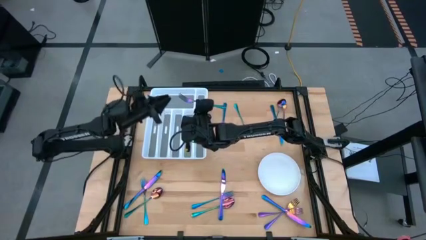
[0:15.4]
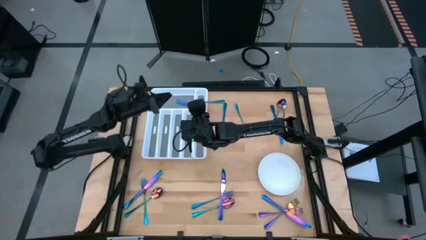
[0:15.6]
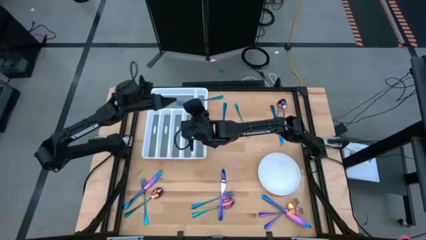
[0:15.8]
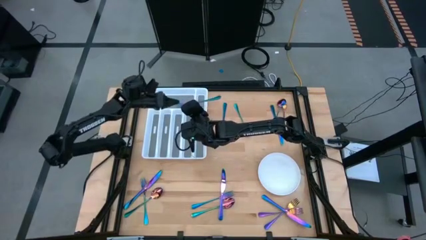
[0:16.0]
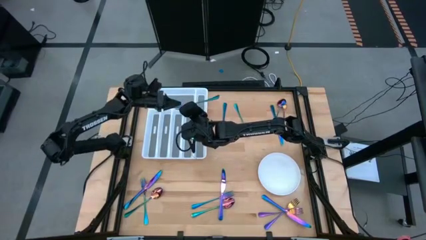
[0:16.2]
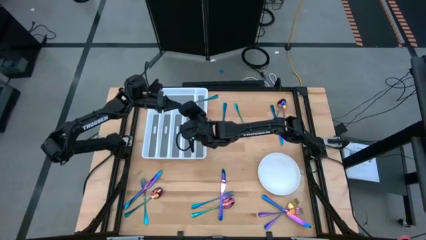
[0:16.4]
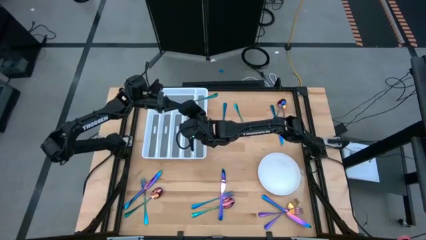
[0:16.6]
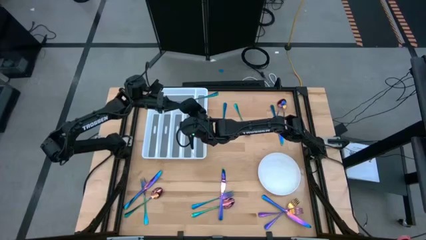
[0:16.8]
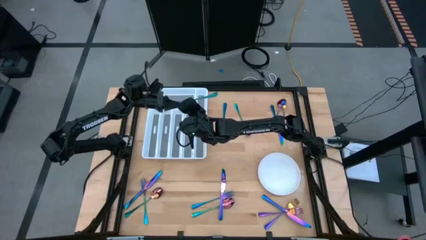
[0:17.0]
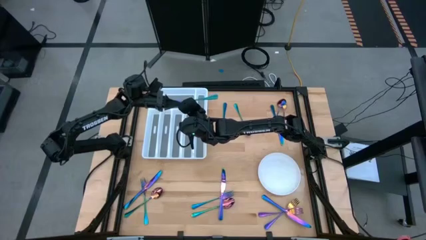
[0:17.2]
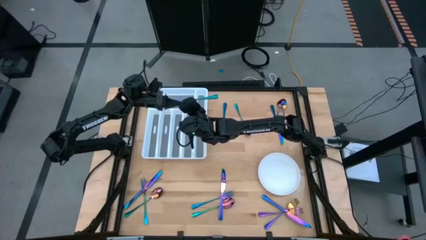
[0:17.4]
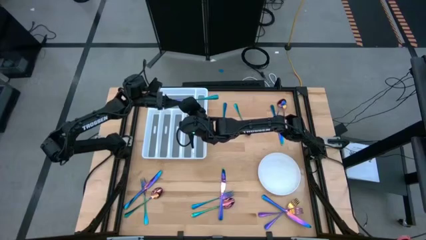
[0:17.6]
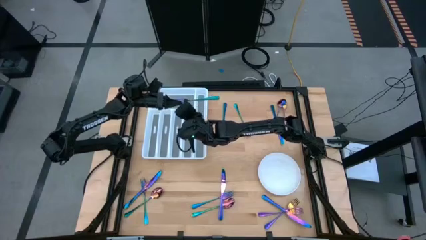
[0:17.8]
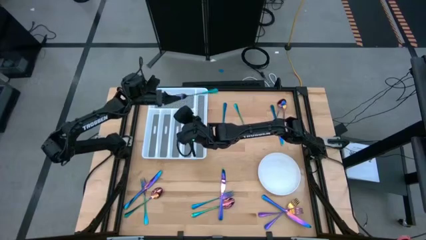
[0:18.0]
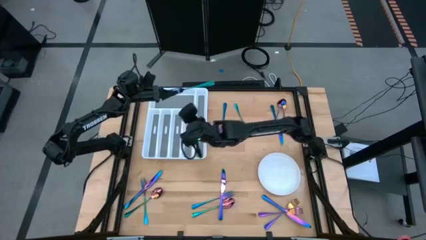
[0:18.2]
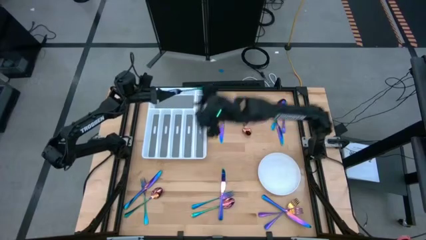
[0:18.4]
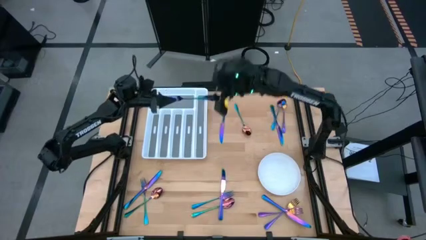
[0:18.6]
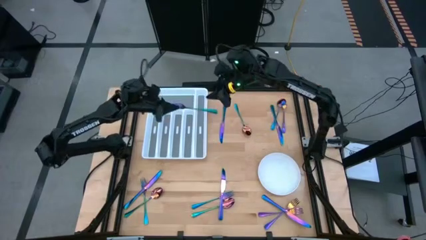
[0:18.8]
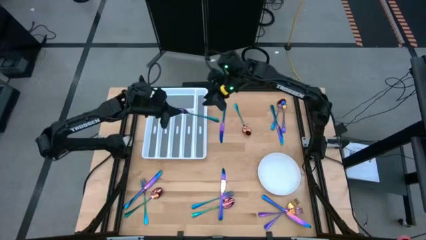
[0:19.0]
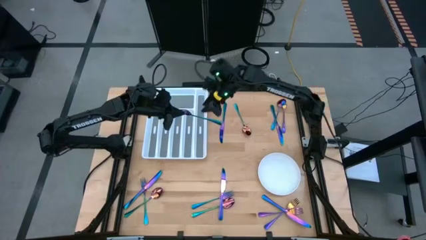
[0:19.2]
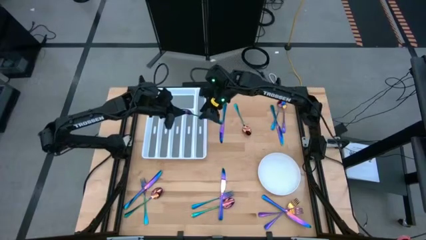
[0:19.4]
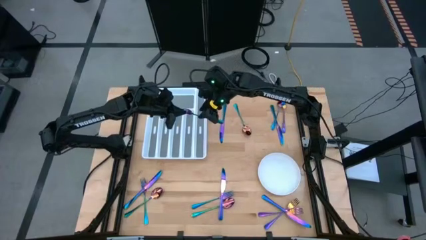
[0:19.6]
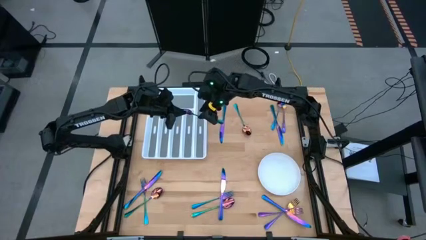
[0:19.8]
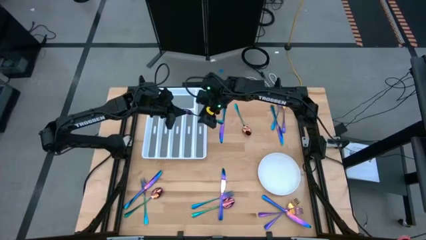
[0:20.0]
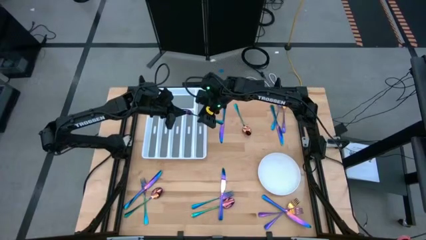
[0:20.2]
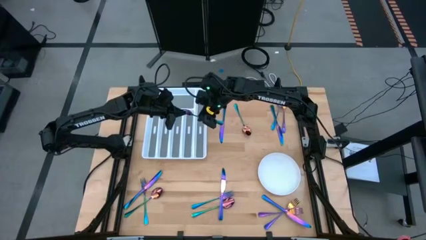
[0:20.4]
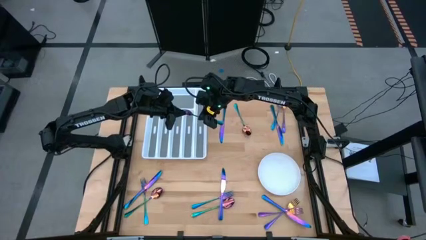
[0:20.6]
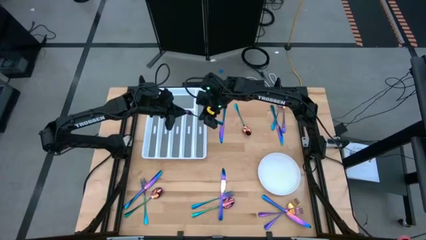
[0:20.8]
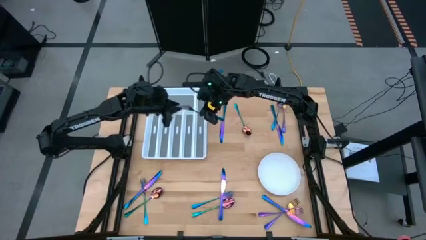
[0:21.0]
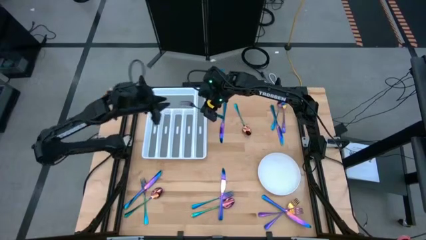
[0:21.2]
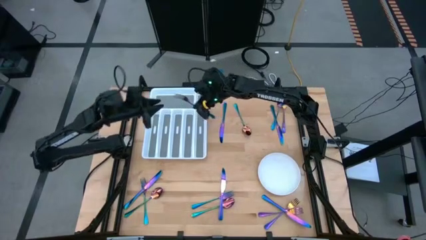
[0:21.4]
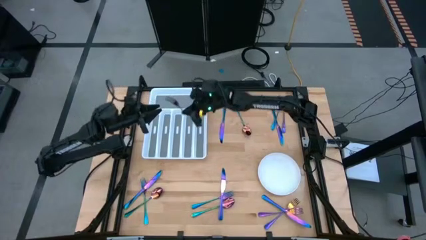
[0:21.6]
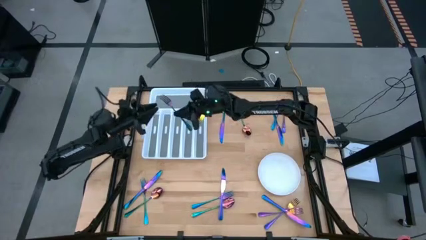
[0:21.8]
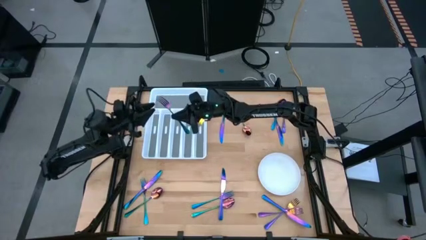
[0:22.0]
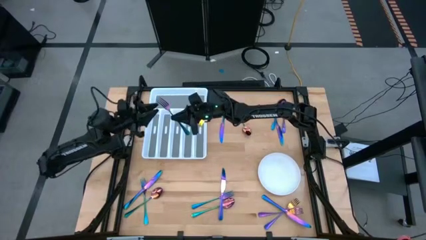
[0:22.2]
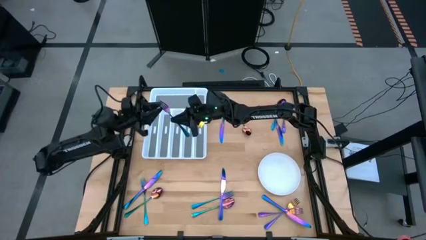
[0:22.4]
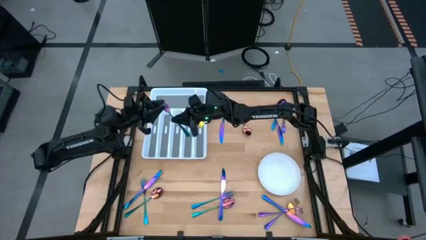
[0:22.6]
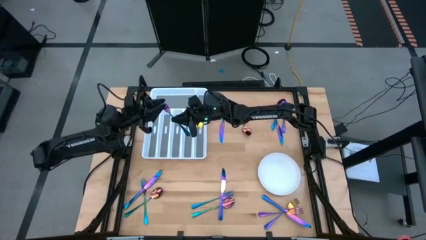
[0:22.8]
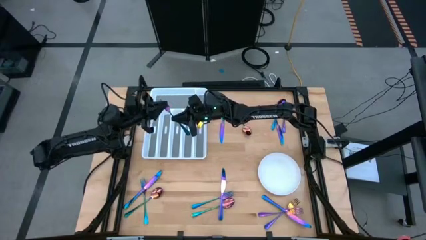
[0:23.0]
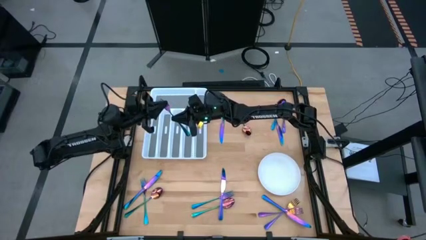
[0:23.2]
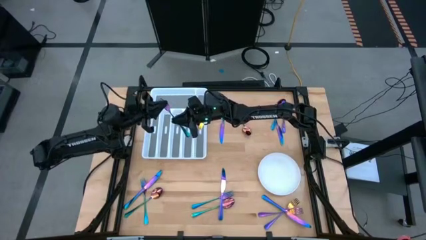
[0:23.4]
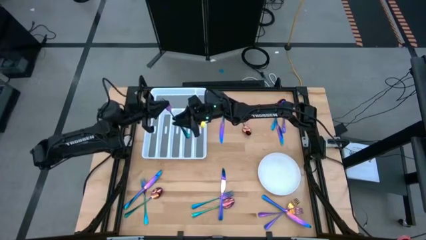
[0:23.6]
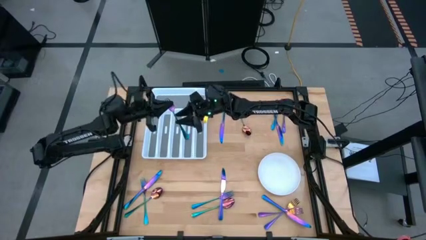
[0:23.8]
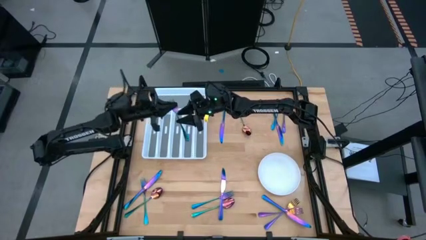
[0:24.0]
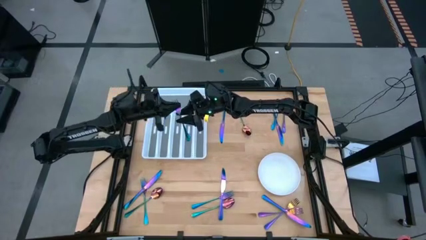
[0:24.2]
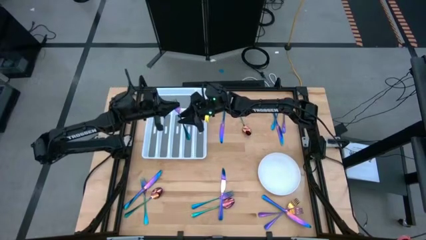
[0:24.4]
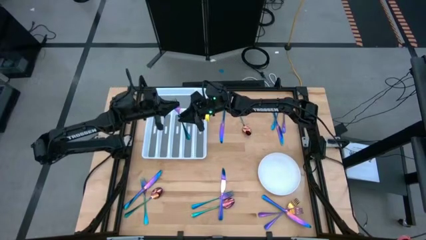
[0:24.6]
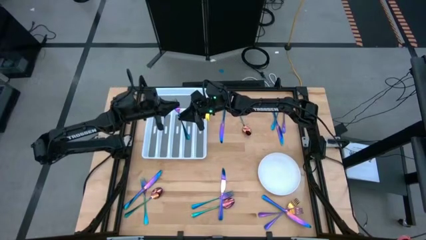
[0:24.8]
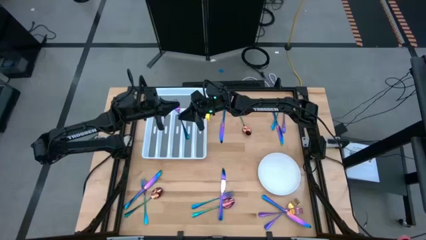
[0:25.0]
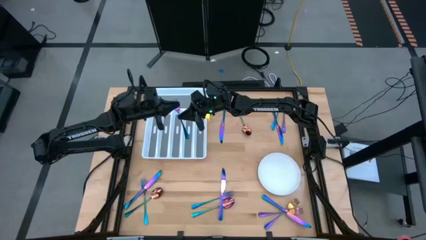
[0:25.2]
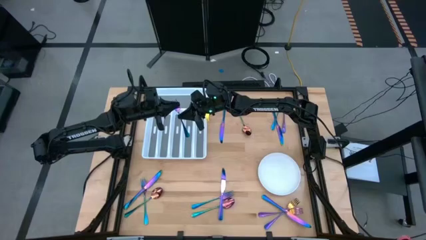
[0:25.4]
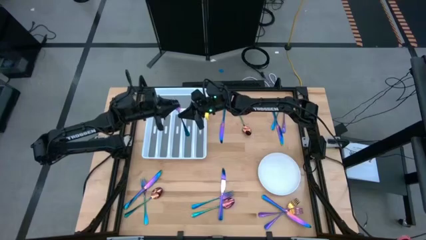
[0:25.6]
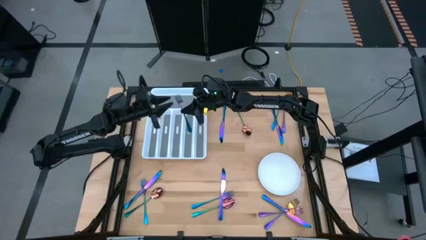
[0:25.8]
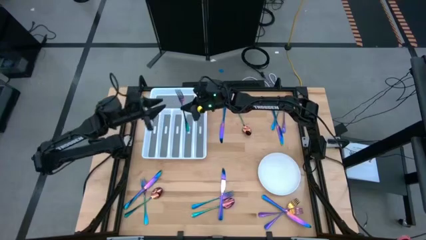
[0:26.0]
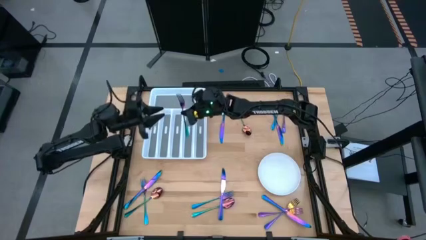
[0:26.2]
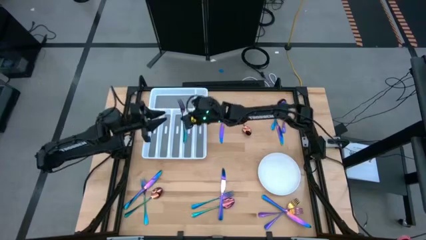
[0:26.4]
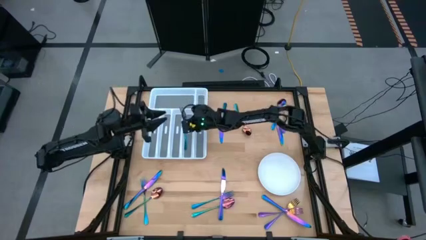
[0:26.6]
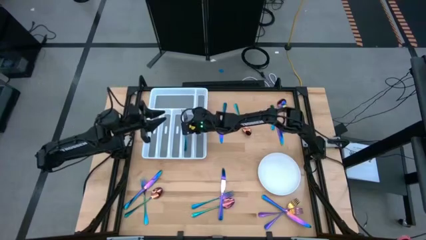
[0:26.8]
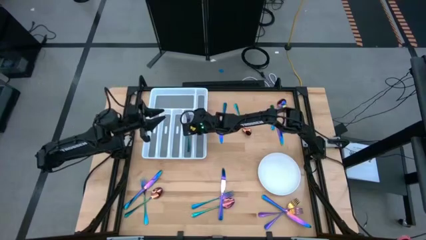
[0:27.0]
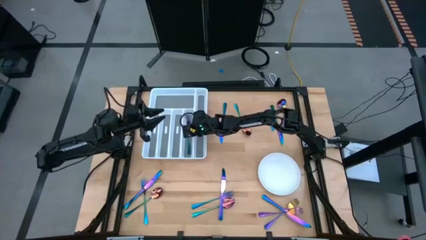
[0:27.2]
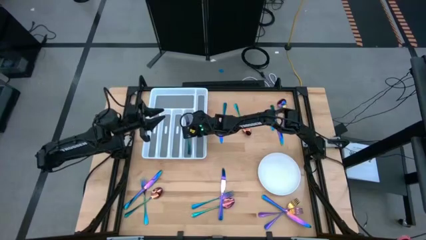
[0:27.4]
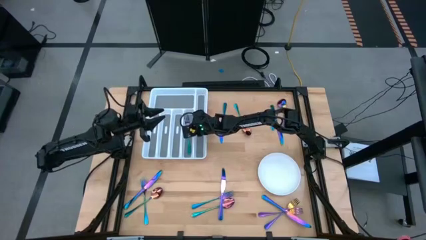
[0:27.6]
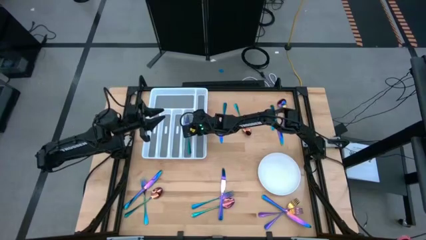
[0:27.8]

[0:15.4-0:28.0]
Task: Sort silverware
Put the iridescent fork into the white silverware tray
